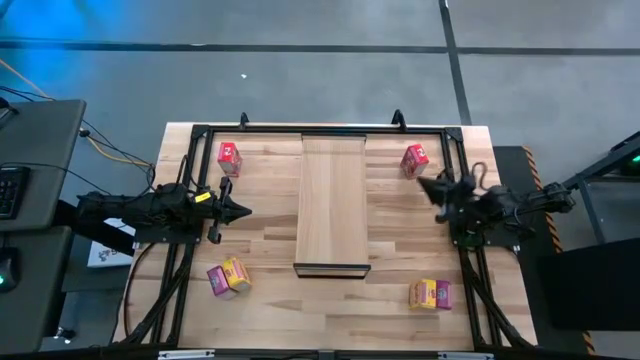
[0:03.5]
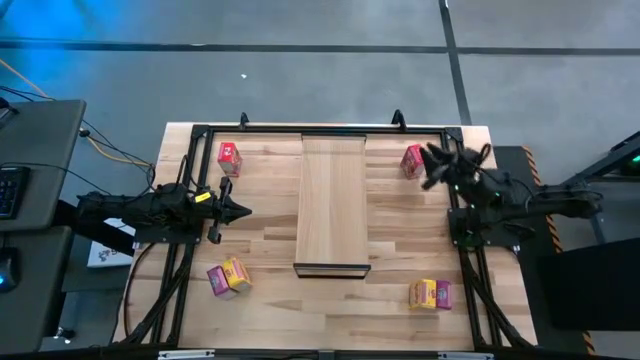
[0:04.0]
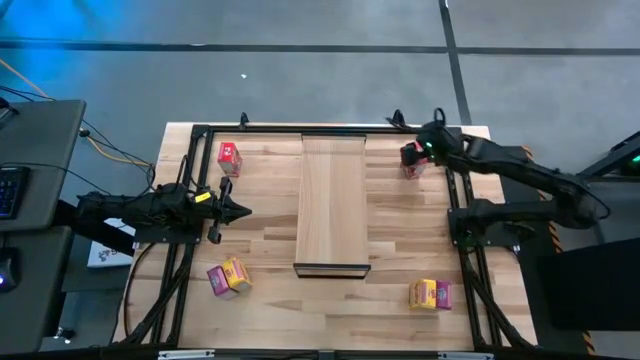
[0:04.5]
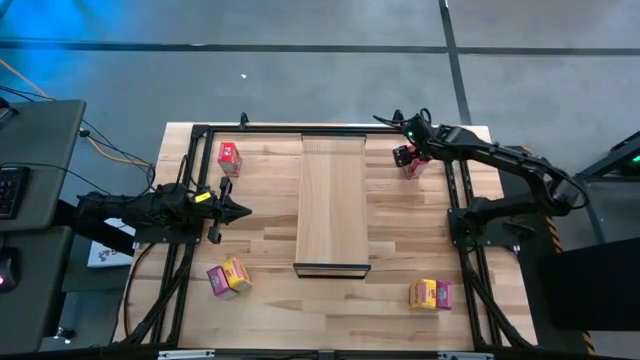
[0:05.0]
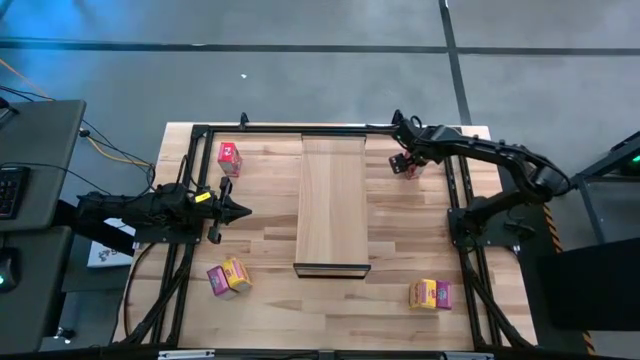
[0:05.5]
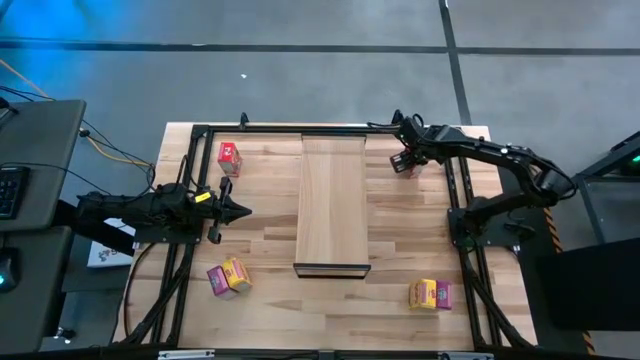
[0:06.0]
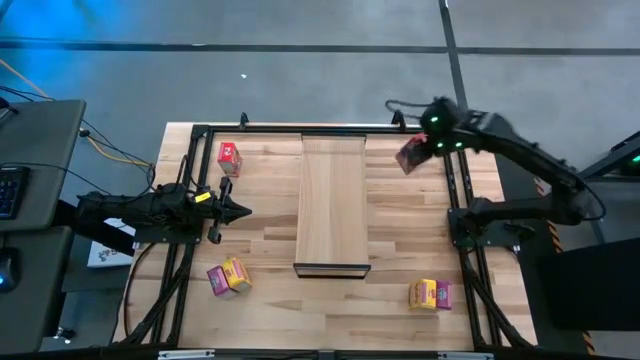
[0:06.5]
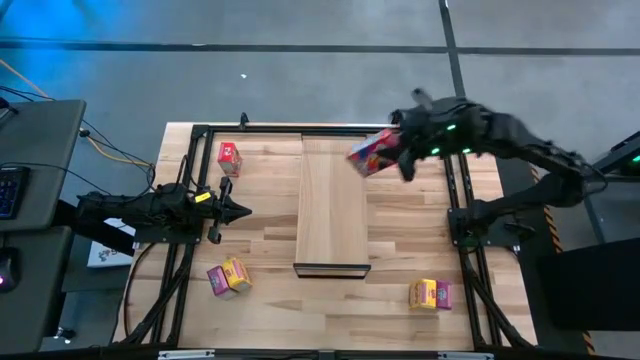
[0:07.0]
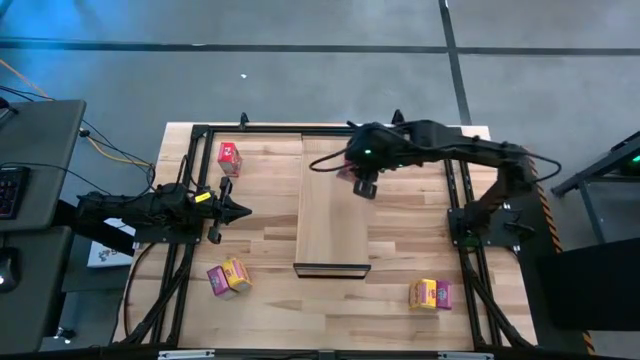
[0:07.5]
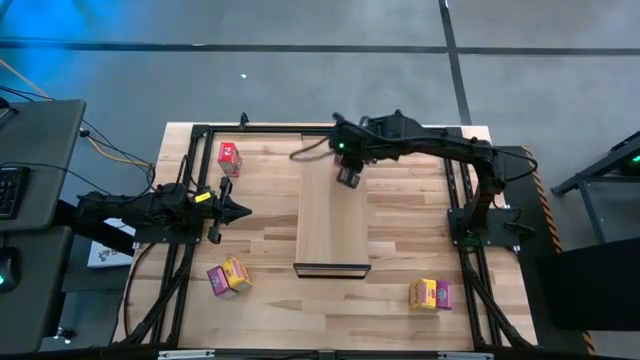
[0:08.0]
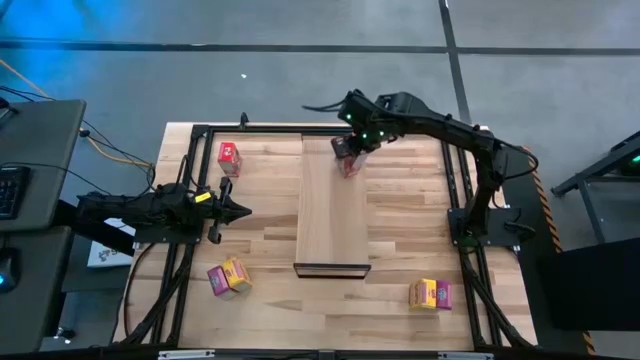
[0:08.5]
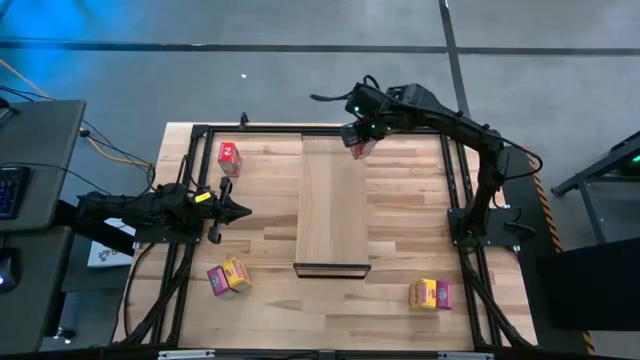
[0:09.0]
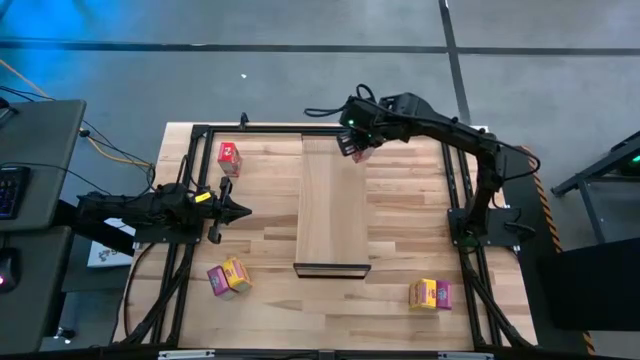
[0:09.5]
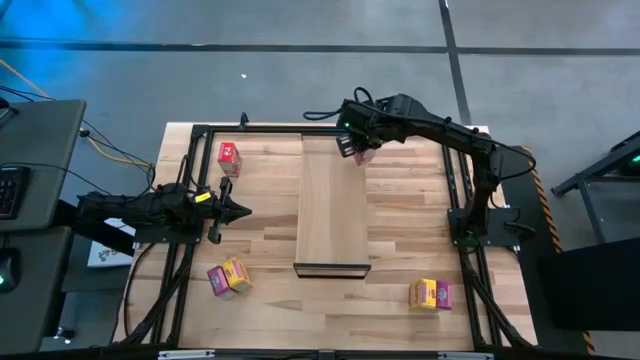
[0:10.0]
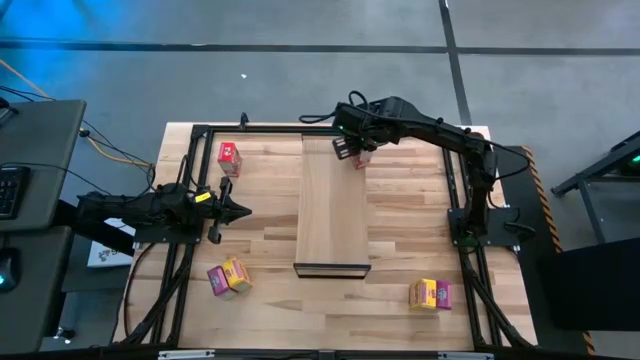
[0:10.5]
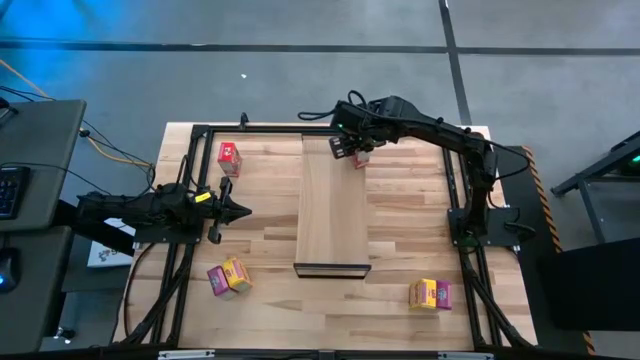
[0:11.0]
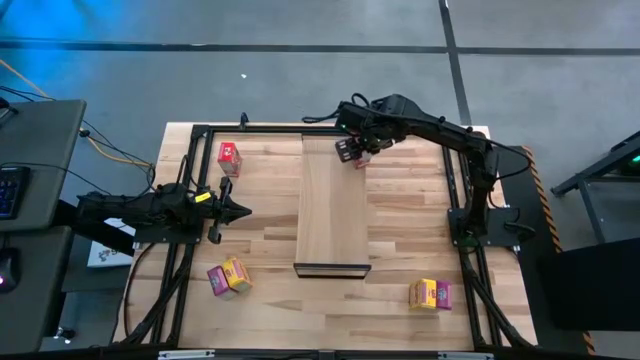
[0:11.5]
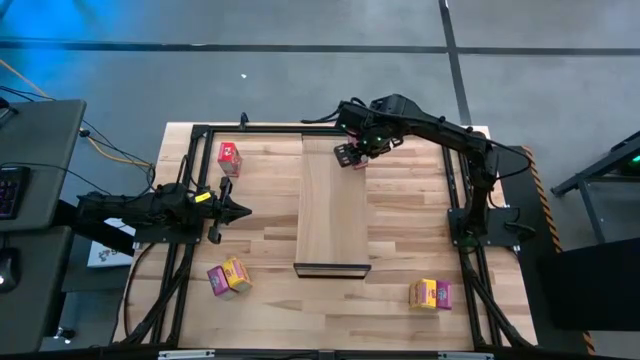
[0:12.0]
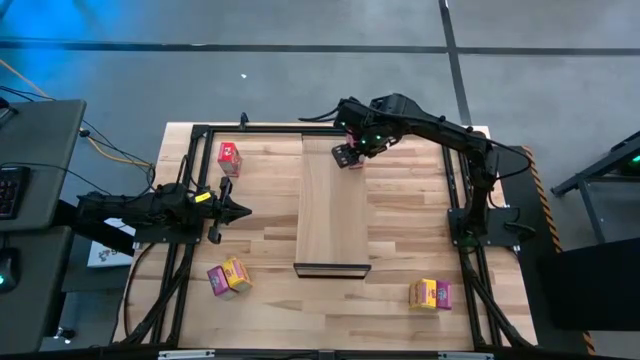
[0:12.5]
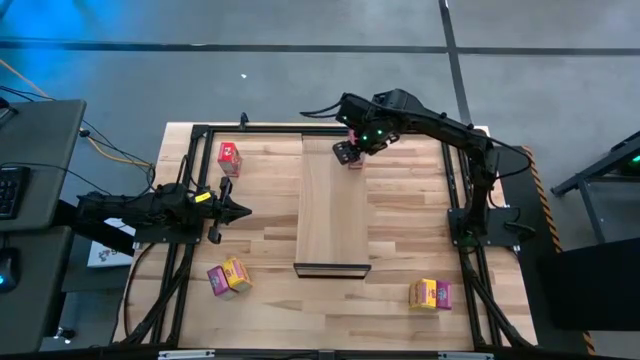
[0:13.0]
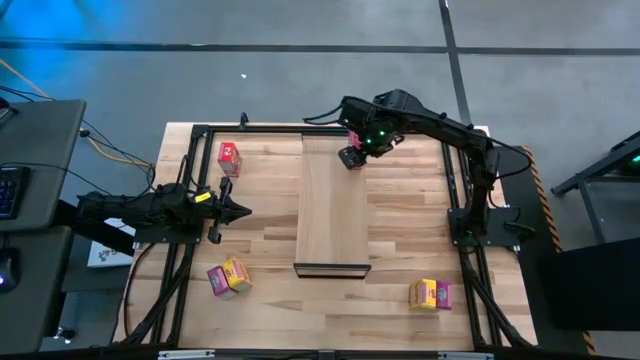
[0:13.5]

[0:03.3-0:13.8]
Task: Stack cereal on shelf
Put the right red cereal box on the shelf

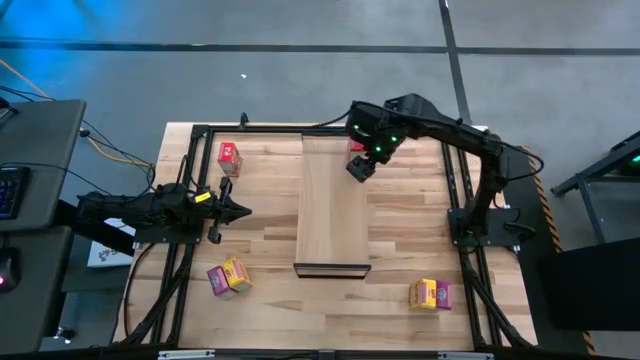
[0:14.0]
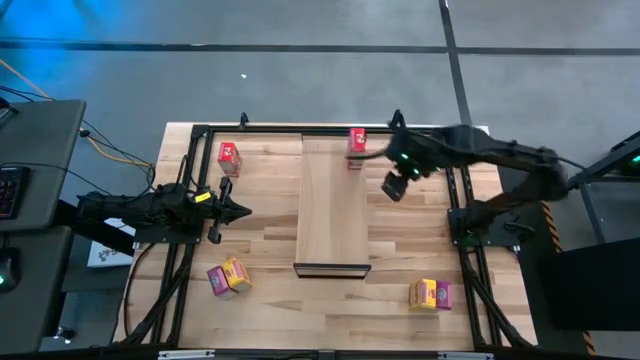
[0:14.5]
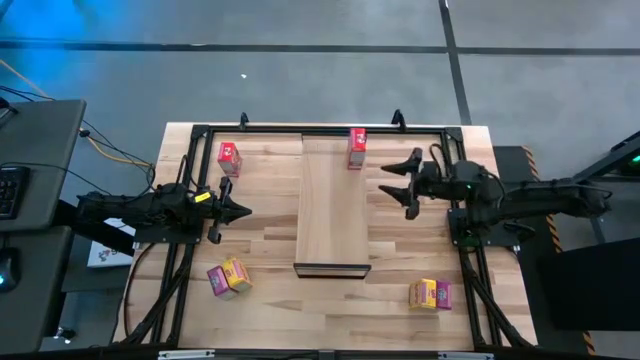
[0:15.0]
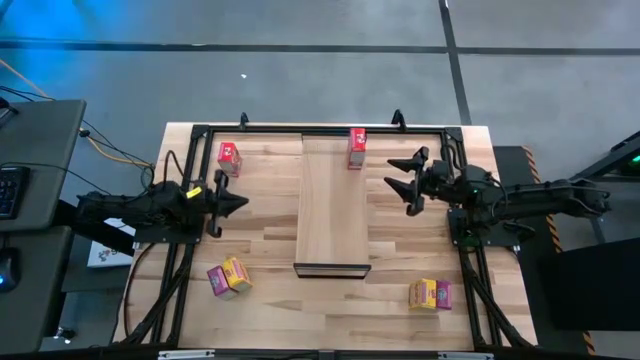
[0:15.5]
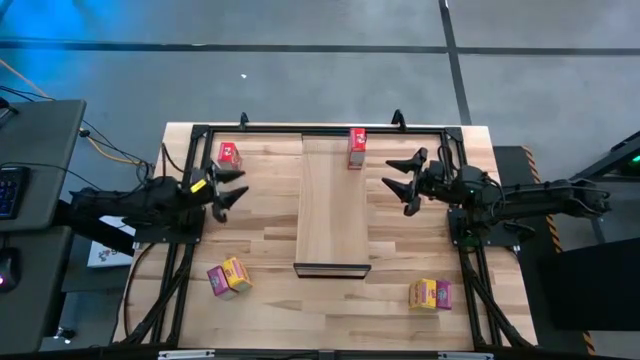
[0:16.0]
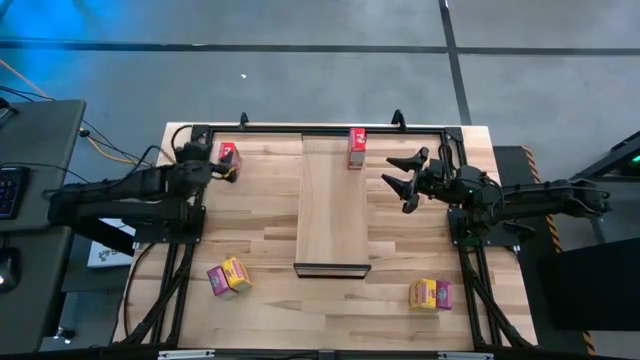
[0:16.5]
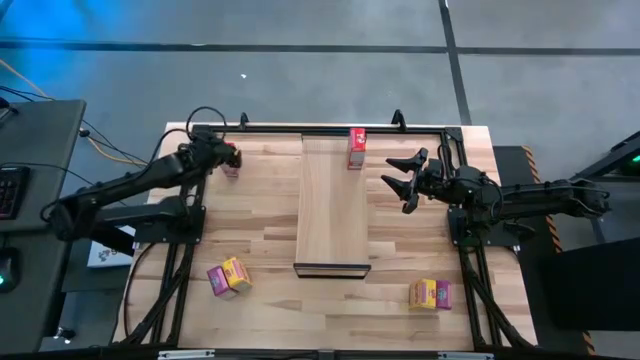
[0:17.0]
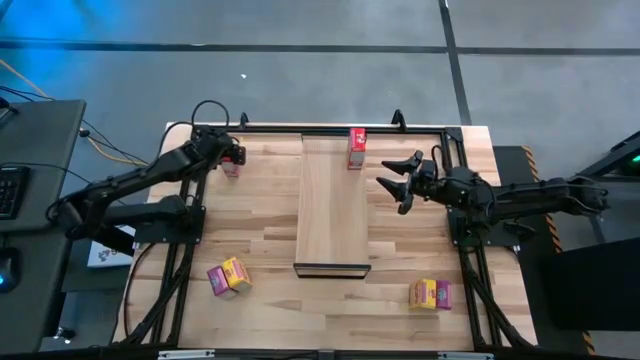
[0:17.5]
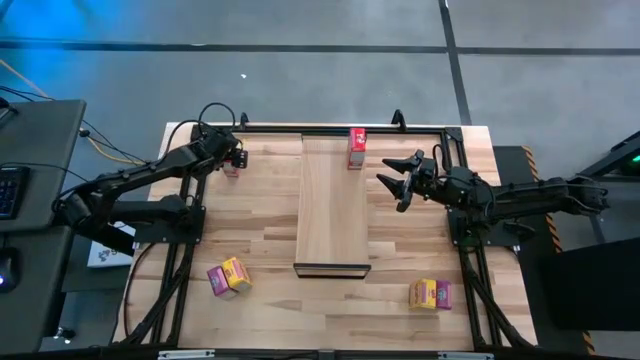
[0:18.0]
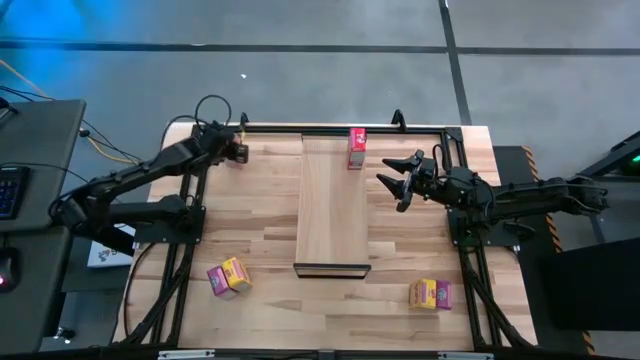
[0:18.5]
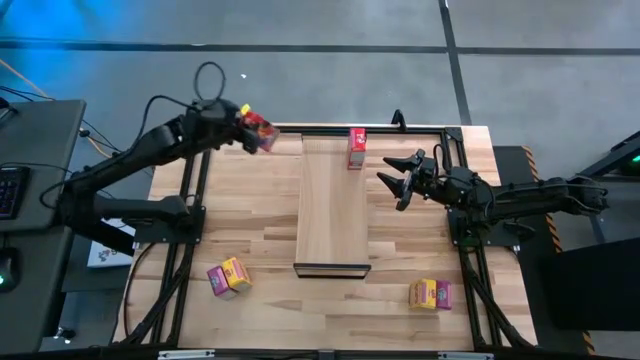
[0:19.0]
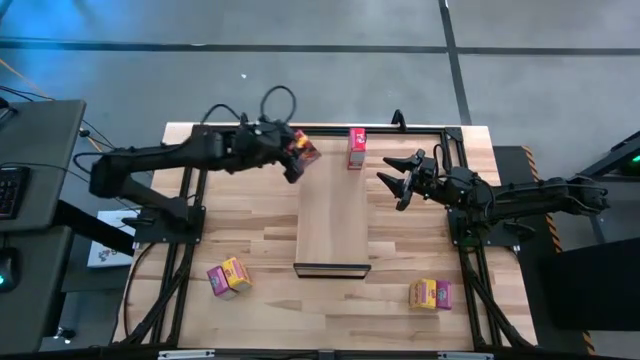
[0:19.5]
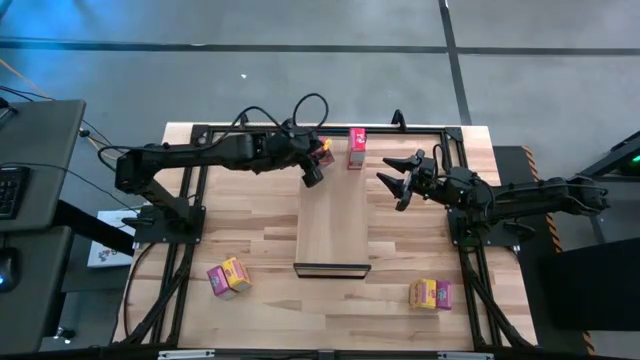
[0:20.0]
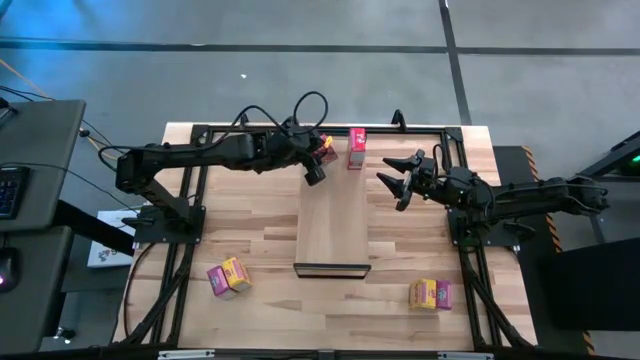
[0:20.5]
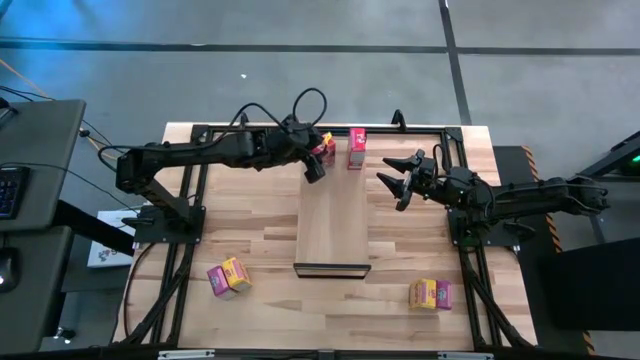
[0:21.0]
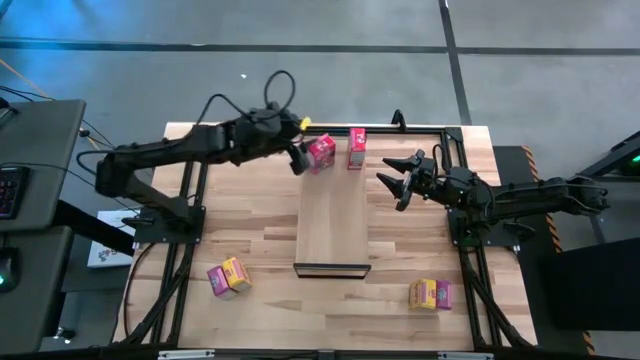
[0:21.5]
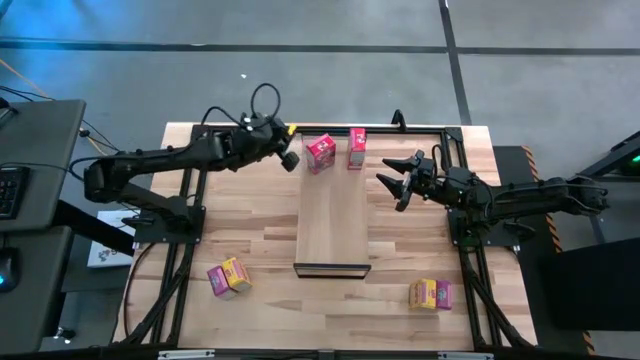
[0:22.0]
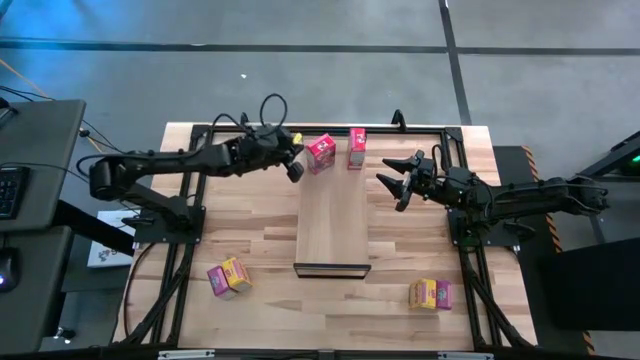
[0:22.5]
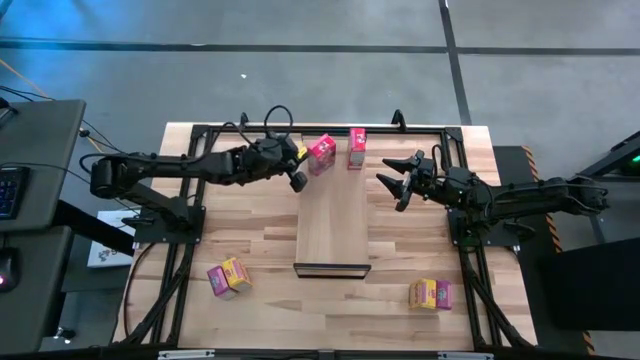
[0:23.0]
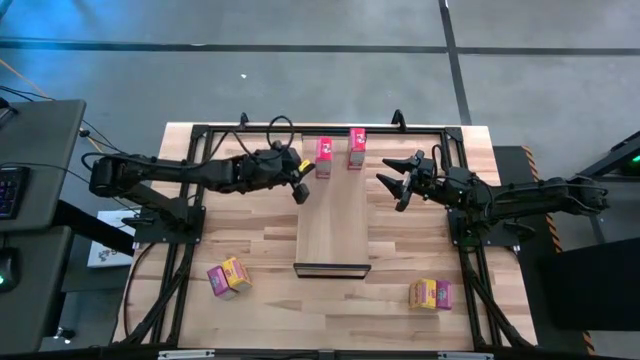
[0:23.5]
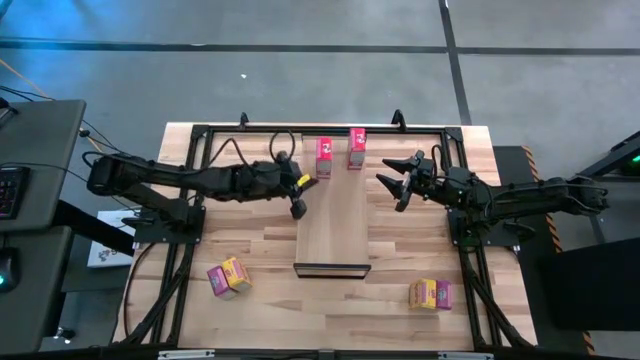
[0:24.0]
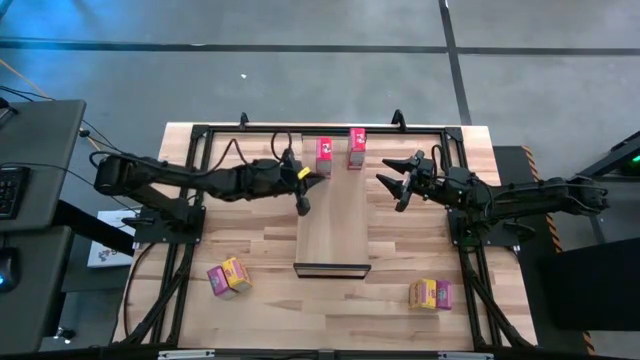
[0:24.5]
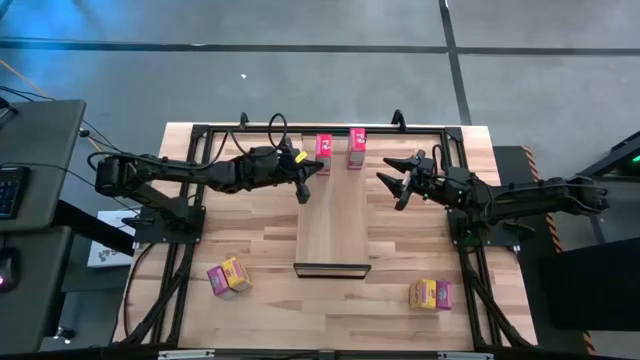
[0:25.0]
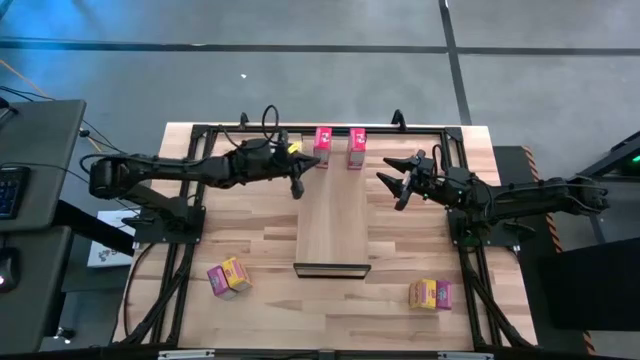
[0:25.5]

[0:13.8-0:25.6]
Put the red cereal box on the shelf aligned with the other red cereal box
